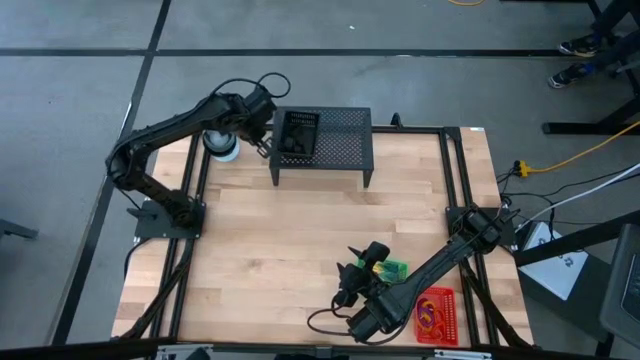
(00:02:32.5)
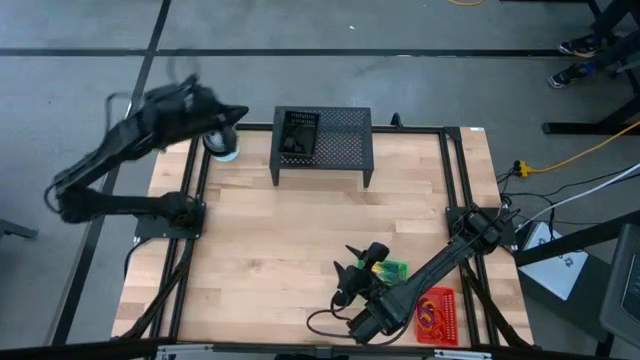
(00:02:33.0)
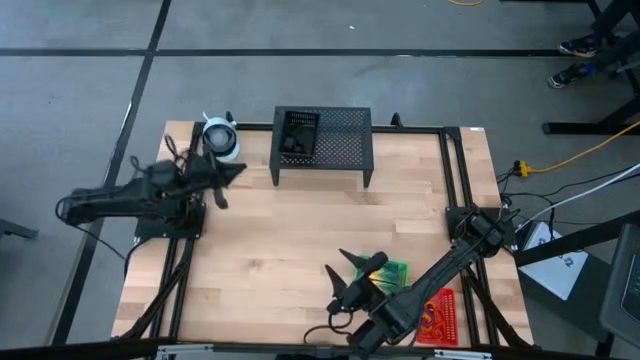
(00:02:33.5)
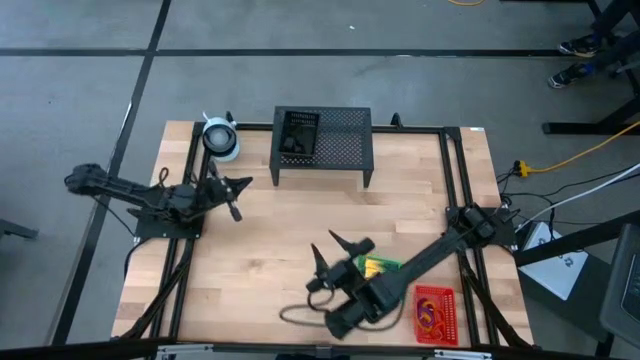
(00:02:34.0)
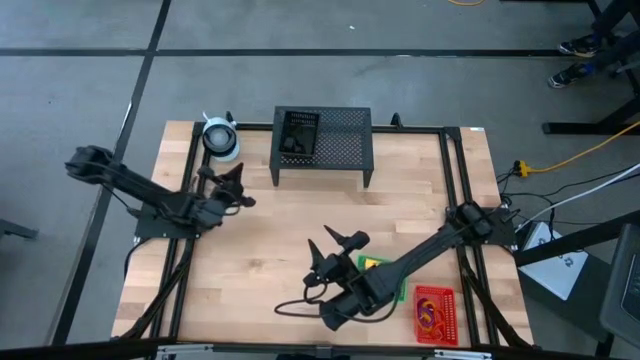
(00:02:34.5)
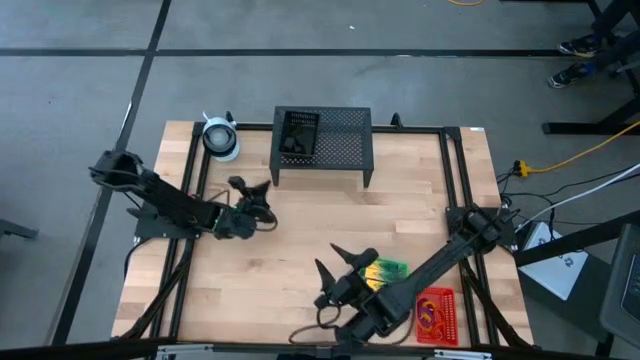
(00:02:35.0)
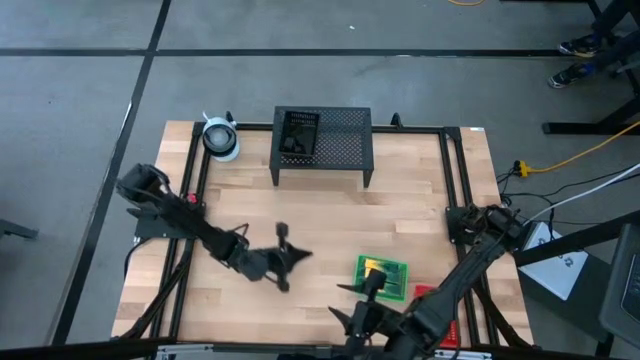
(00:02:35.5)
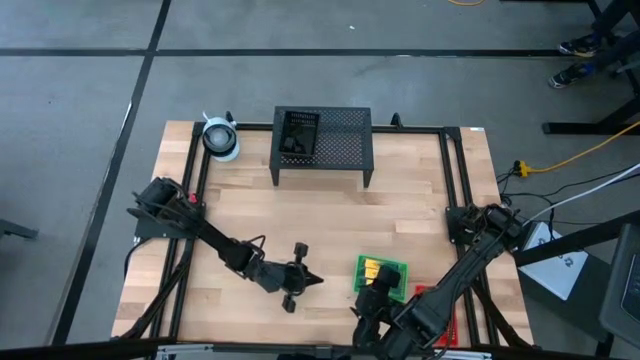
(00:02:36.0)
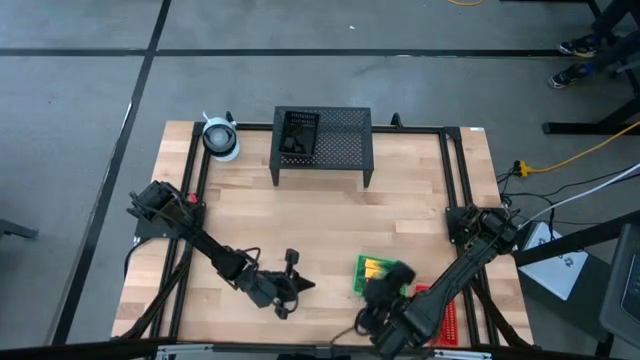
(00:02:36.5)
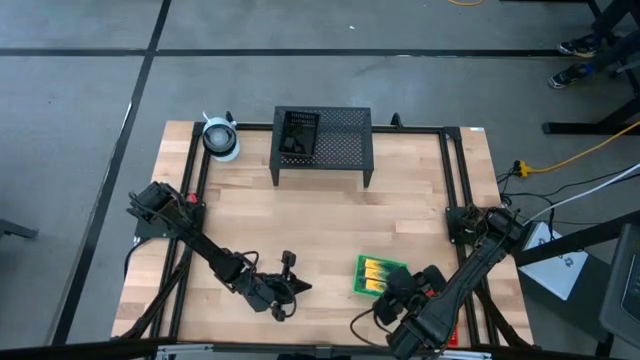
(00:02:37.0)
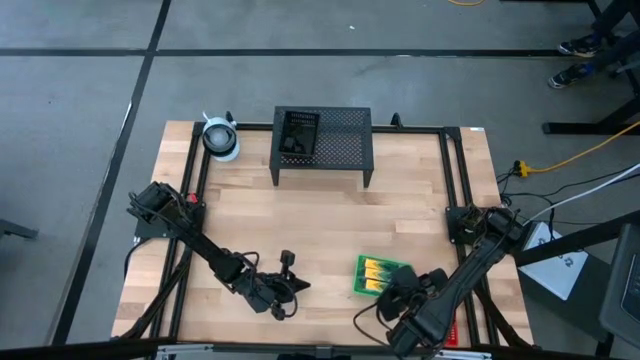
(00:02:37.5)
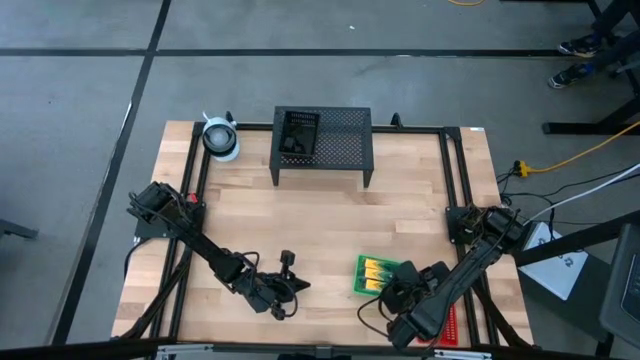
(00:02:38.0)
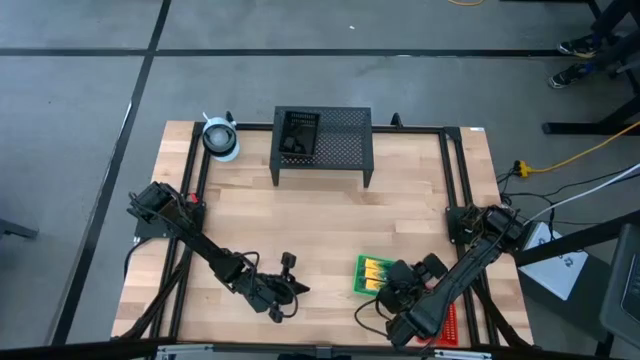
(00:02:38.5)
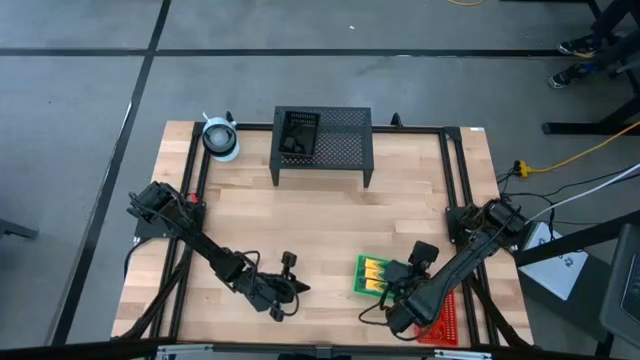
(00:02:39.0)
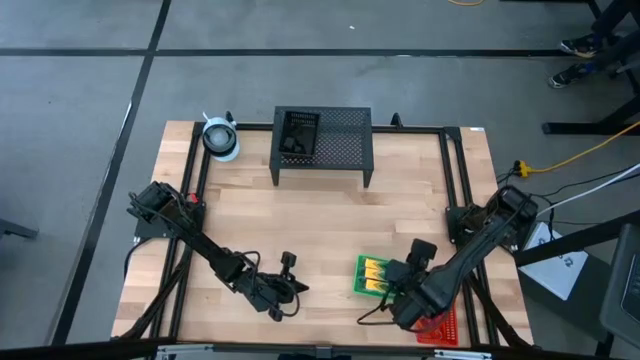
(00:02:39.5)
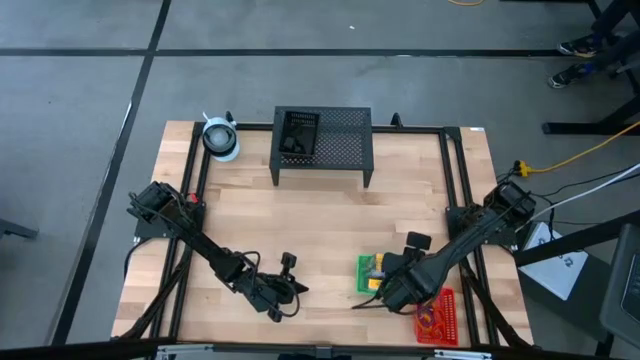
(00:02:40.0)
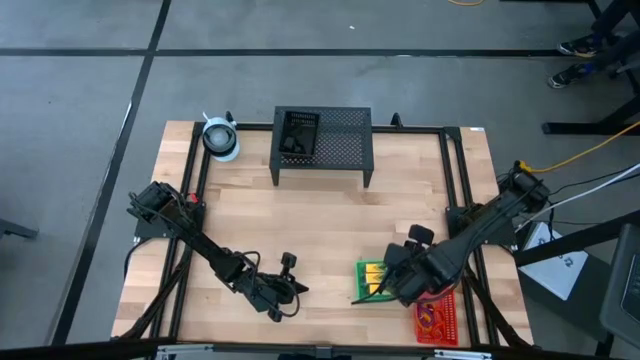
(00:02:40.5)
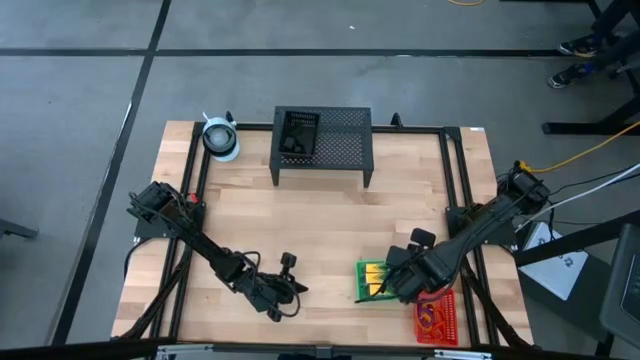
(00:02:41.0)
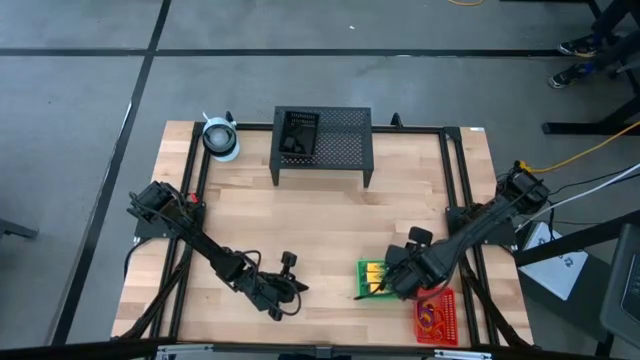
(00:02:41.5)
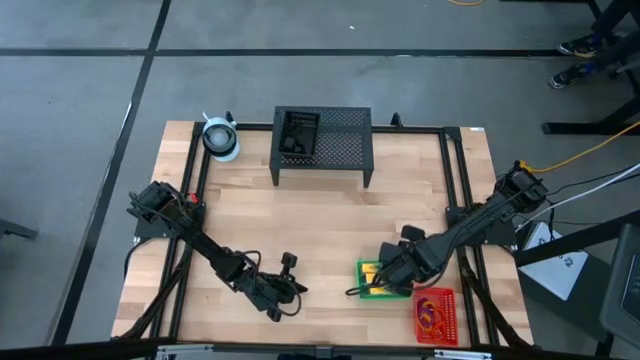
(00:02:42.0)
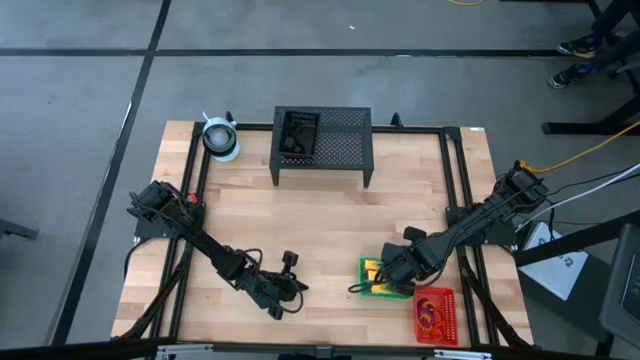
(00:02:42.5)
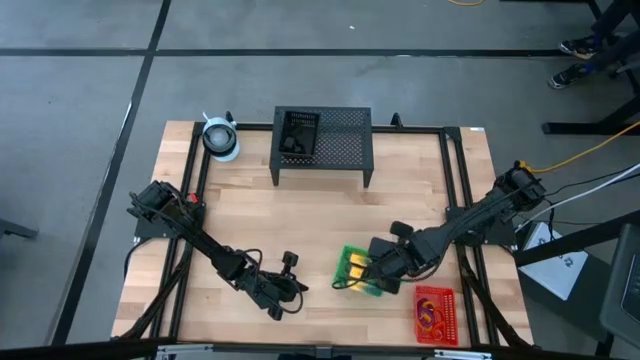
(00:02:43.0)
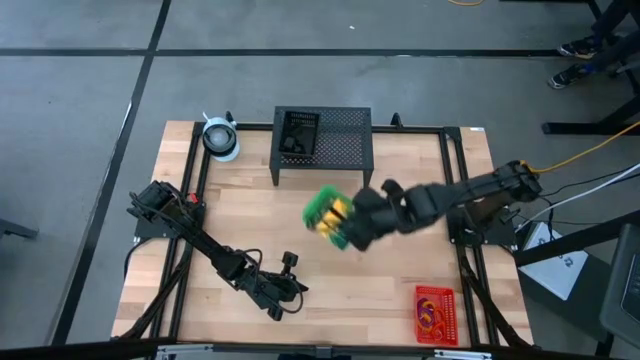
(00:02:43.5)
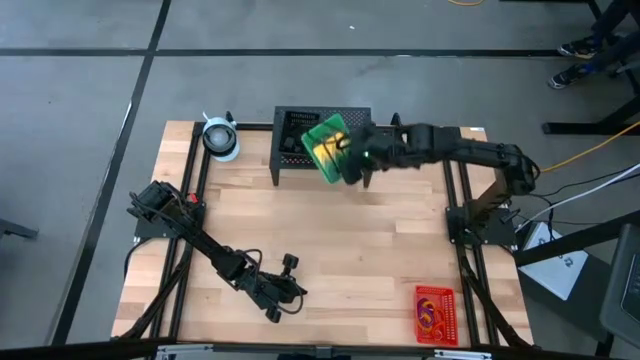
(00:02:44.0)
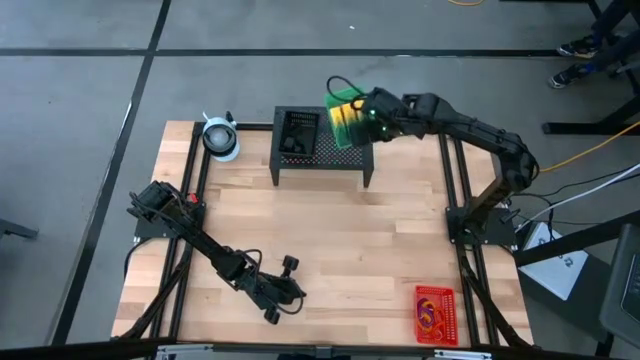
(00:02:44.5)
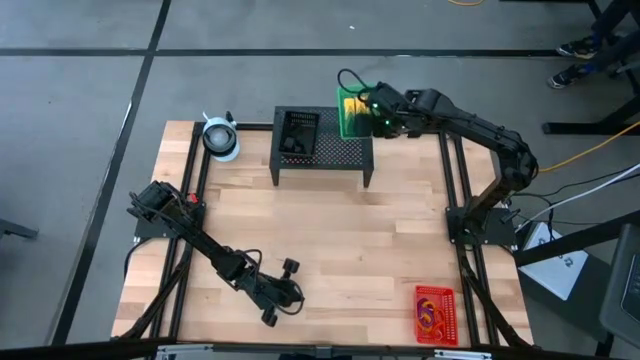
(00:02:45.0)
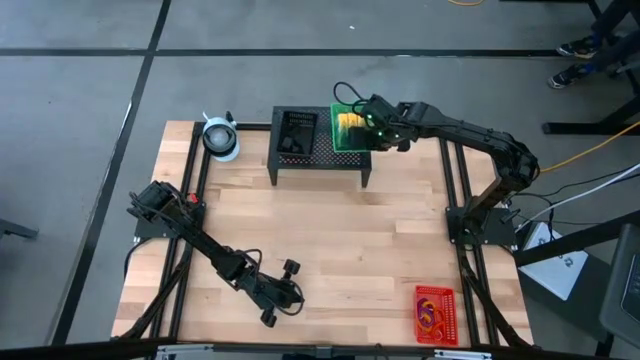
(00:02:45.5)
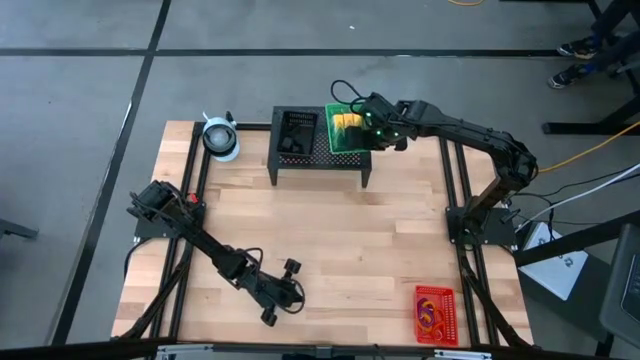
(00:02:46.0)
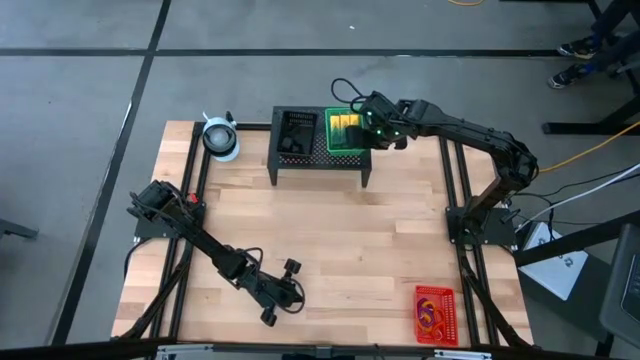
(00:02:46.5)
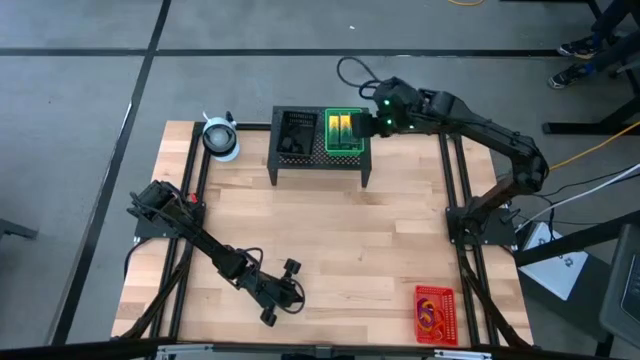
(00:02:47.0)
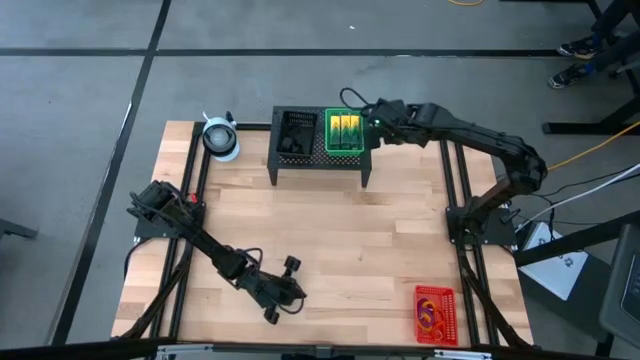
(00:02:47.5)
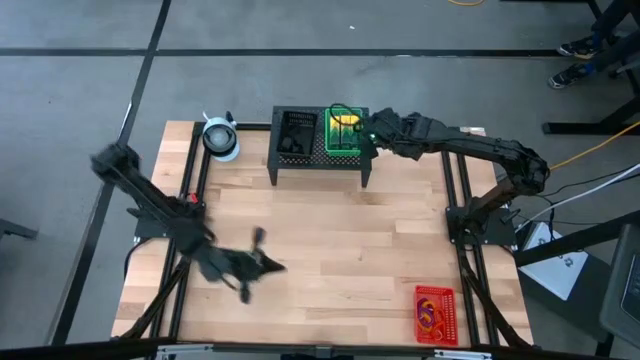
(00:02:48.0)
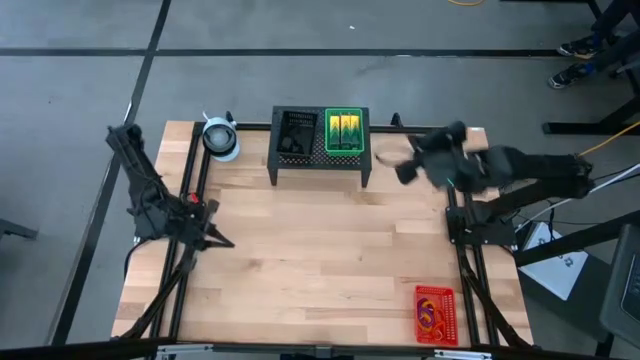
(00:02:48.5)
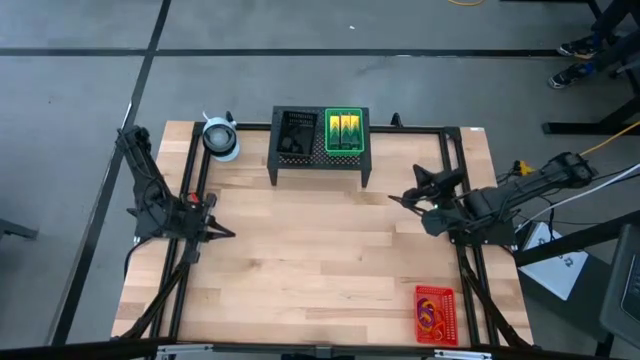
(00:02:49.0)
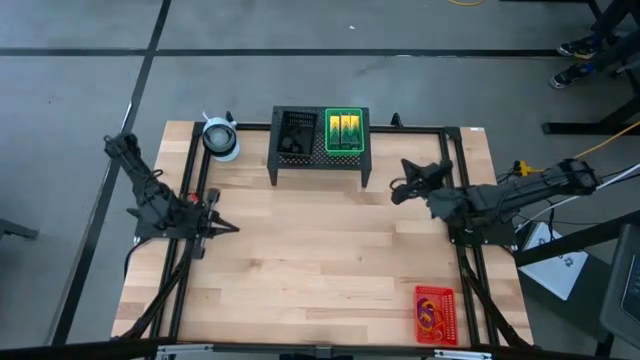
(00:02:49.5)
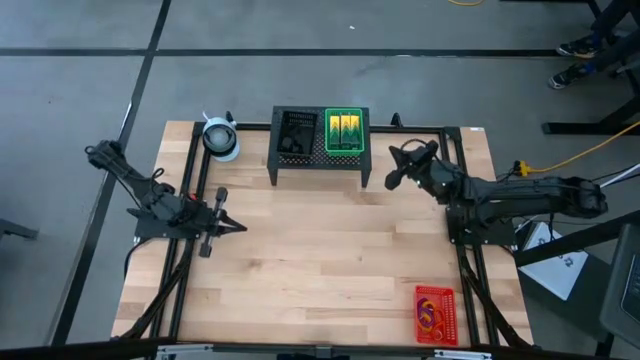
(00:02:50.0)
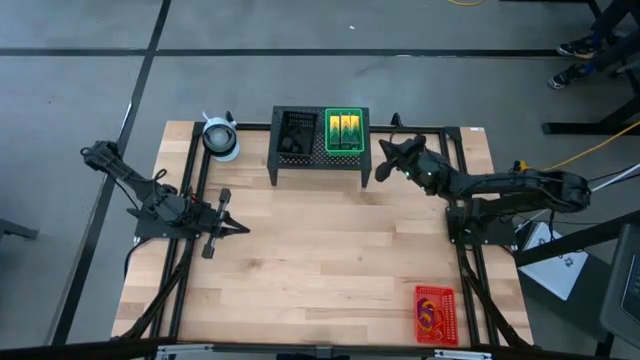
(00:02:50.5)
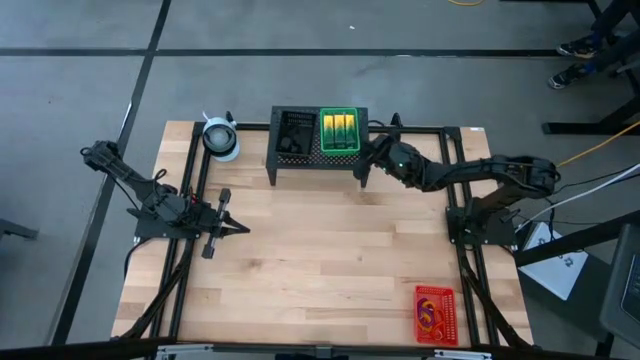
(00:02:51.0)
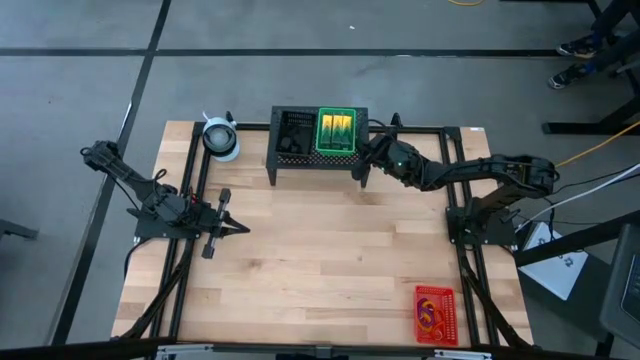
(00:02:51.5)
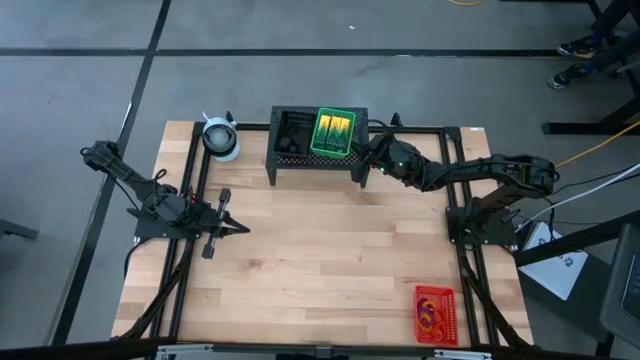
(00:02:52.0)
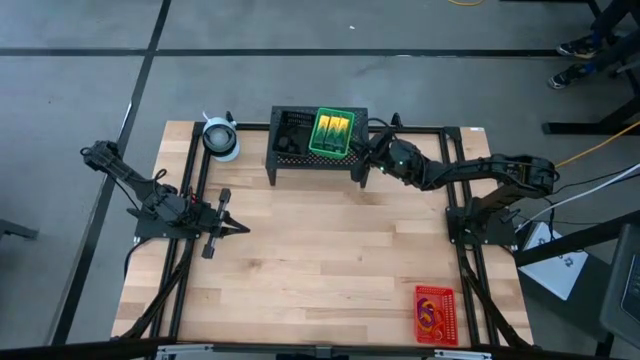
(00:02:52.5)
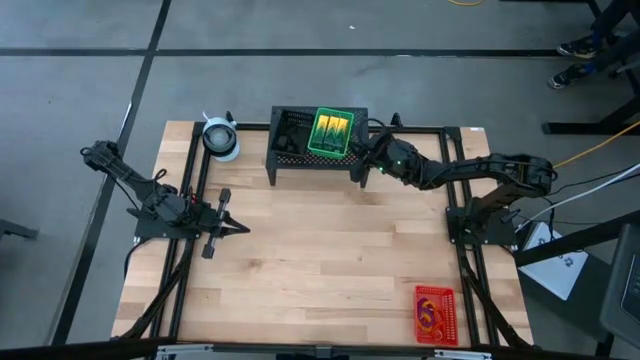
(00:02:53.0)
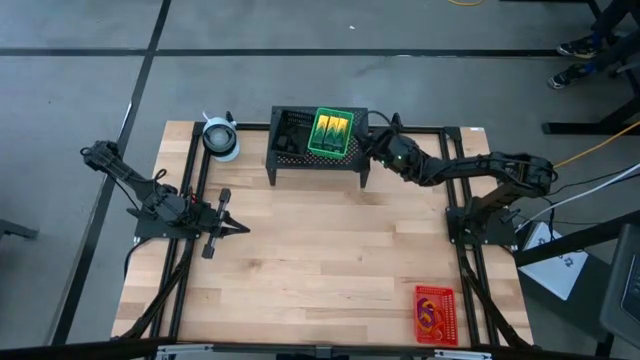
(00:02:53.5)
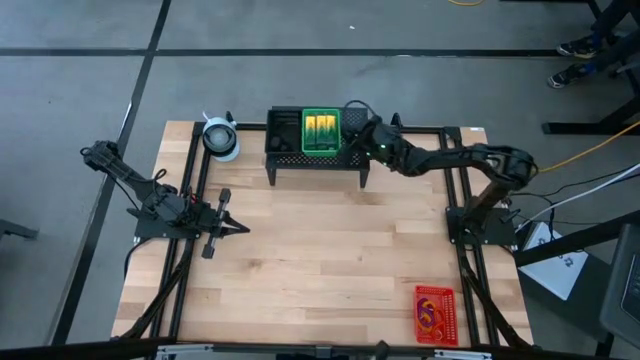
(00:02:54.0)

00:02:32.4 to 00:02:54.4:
Task: Pick & Place Office Desk Supplies
Put the green bin with crayon boxes on the shelf
